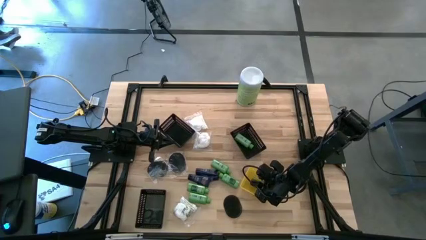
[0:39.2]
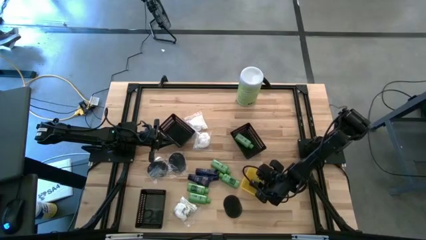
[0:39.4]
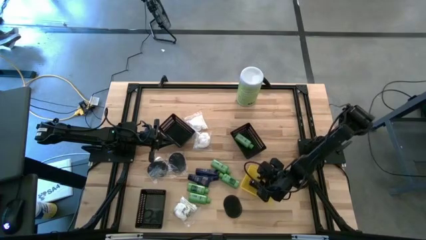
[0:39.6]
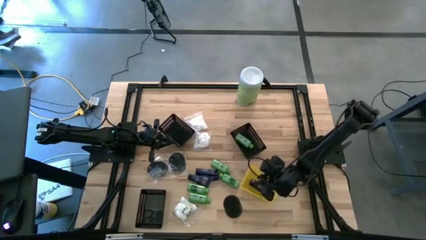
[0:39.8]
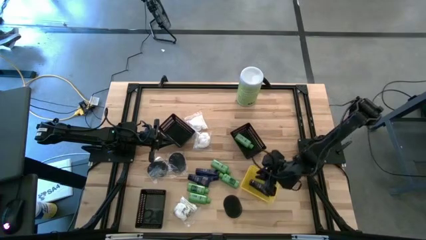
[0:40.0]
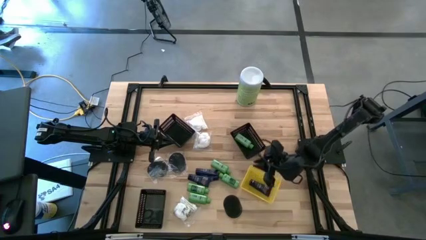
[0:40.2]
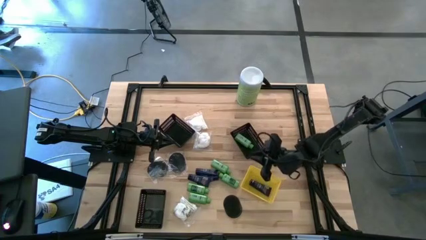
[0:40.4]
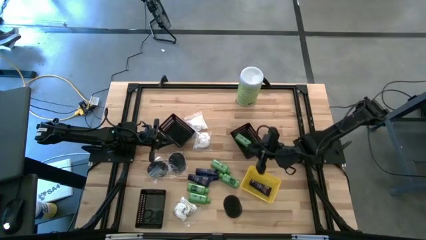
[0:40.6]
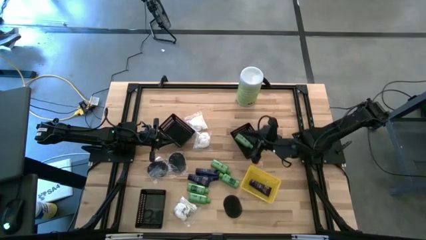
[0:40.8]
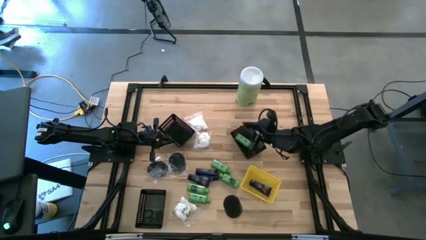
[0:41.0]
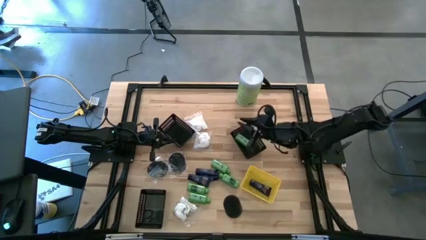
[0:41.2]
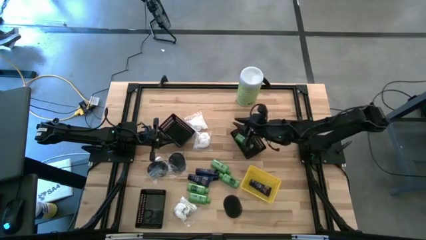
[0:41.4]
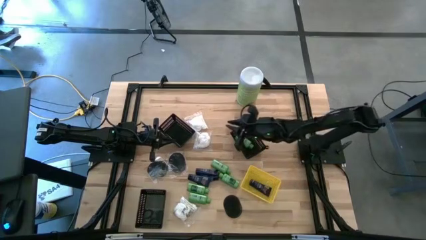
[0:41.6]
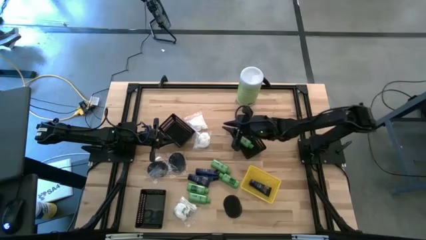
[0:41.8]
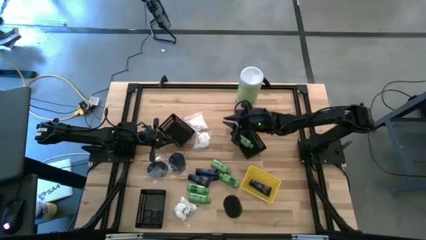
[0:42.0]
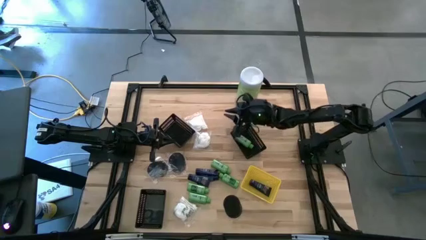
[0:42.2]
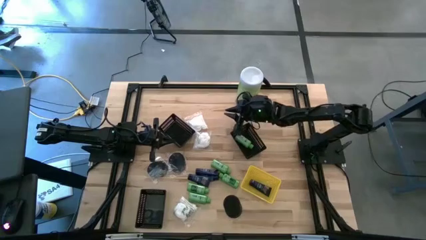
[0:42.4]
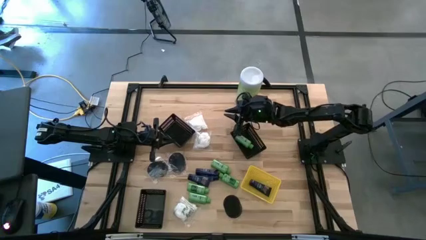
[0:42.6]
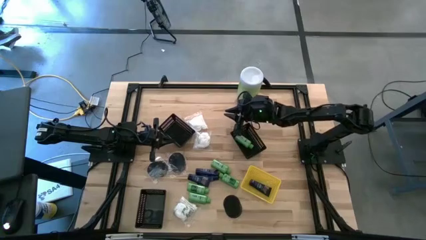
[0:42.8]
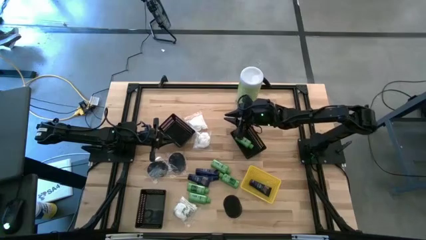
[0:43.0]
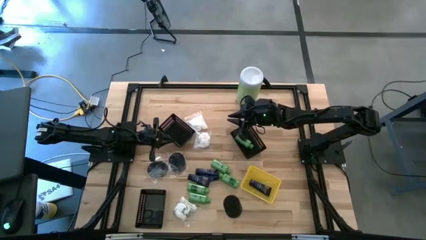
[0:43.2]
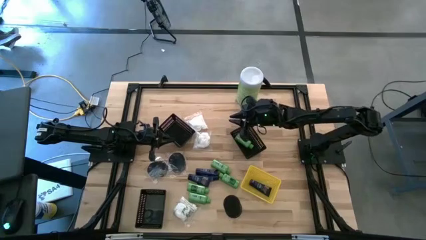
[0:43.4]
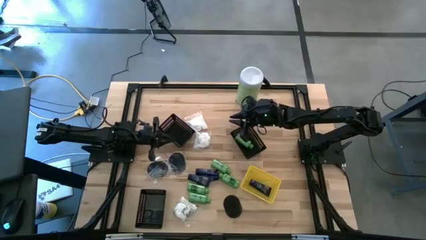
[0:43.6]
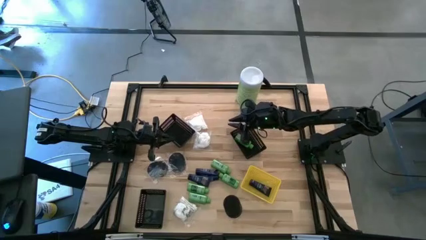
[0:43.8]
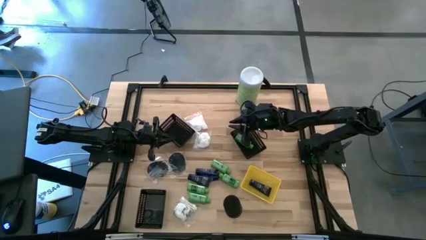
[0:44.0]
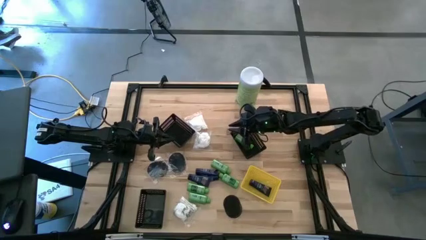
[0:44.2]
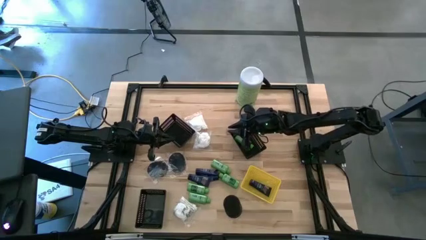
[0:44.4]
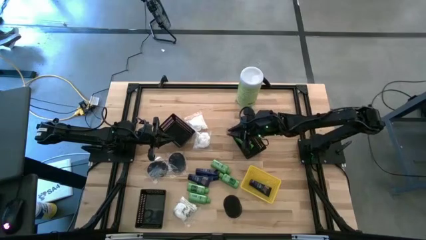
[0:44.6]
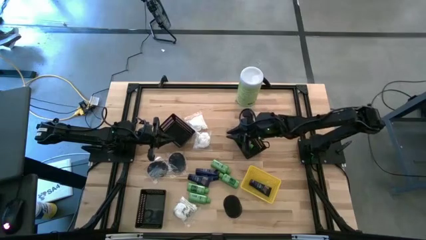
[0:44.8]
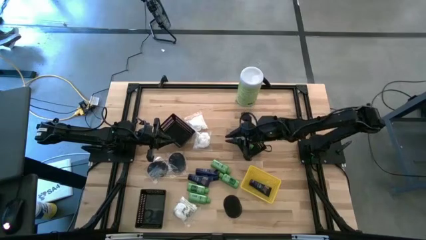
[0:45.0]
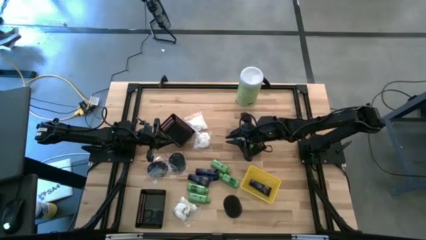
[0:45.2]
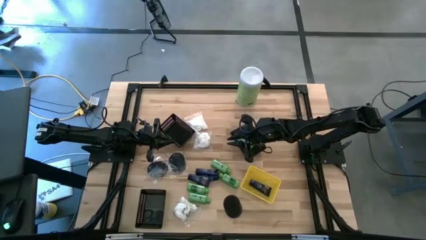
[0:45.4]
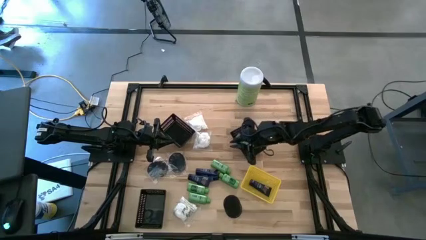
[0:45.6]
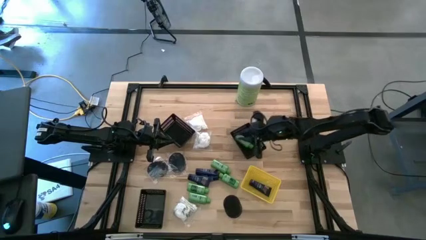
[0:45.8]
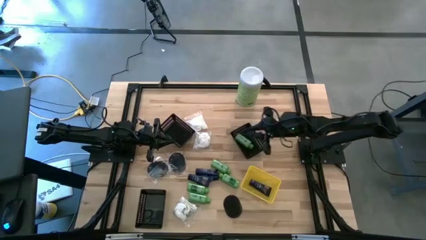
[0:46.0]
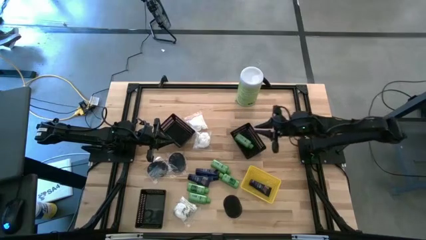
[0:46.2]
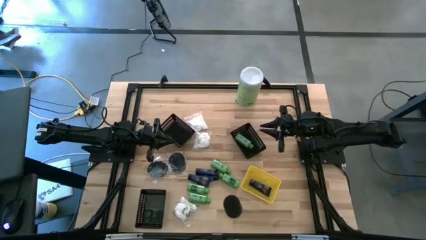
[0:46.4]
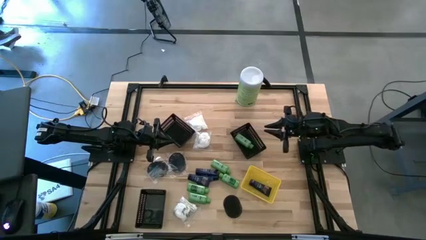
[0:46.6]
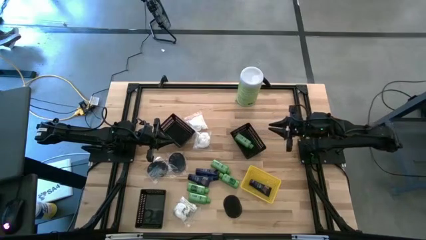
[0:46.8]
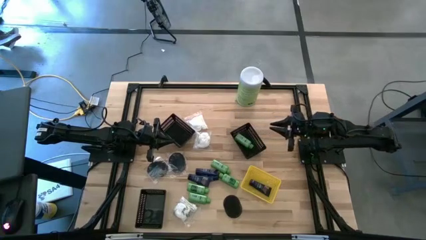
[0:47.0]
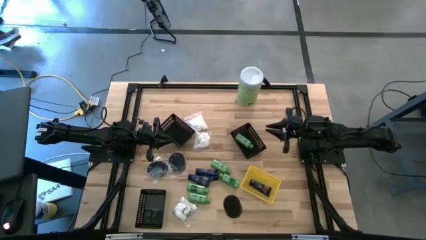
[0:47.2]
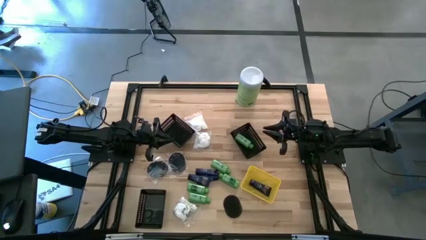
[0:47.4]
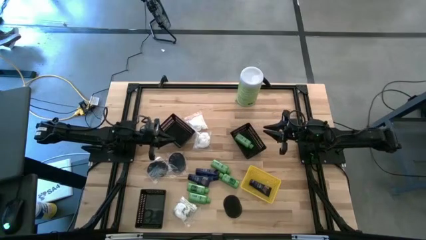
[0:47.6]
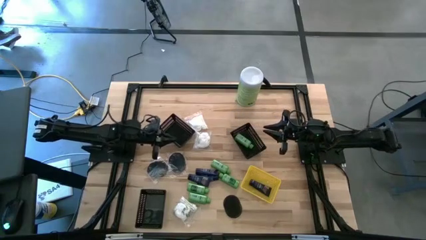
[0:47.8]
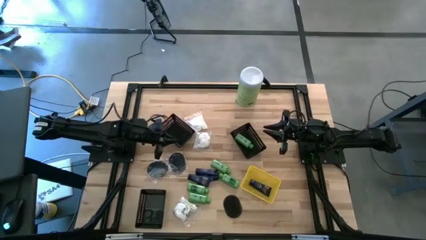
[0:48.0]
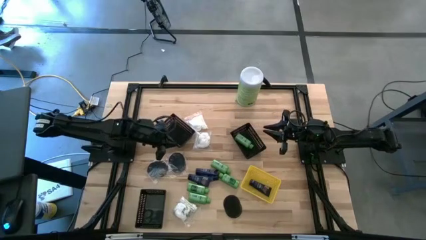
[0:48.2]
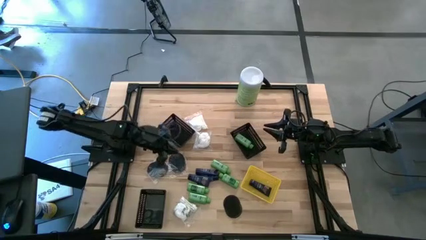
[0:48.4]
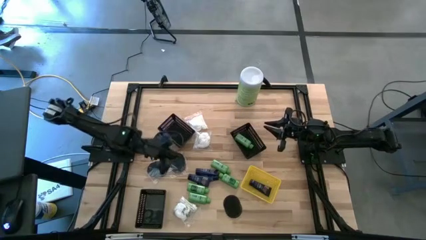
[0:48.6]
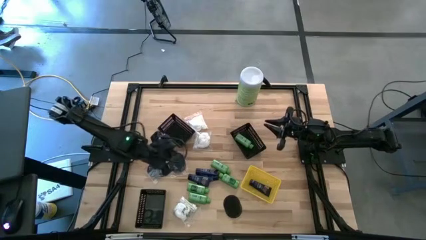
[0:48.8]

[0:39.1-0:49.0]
Task: Pick & Place Travel size toiletries
Put the hairbrush into the top left black bin

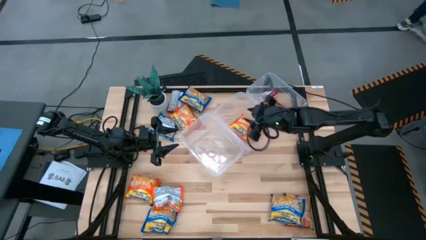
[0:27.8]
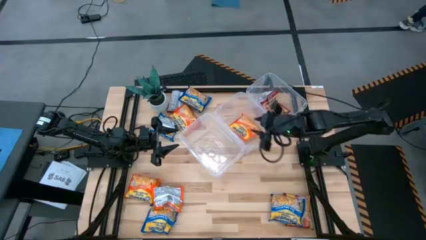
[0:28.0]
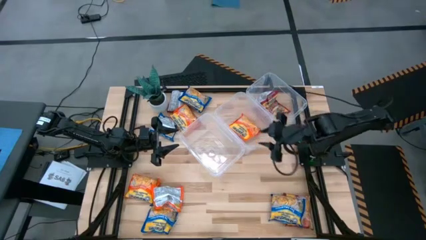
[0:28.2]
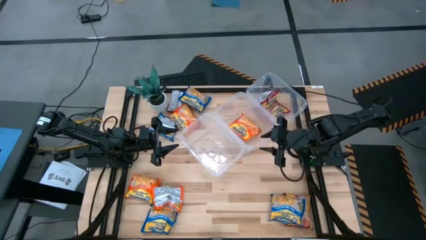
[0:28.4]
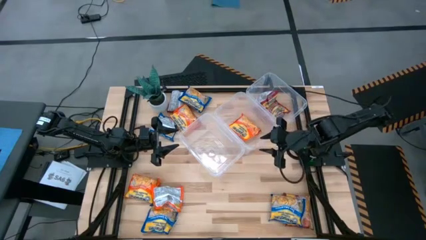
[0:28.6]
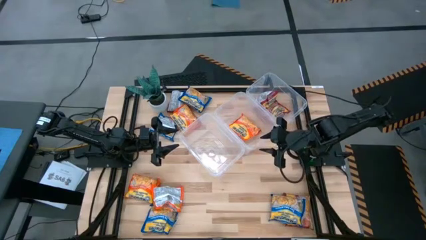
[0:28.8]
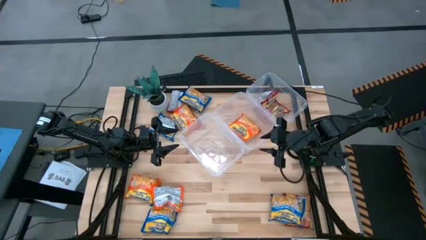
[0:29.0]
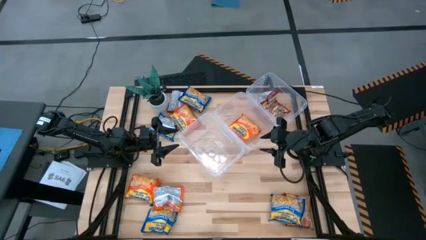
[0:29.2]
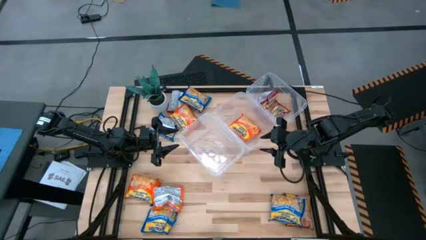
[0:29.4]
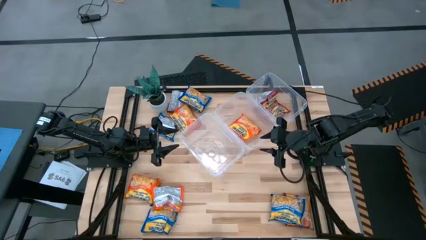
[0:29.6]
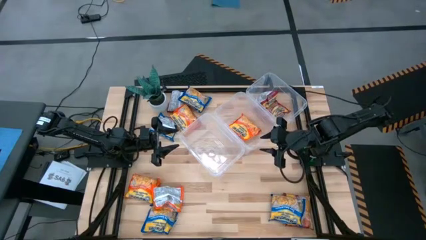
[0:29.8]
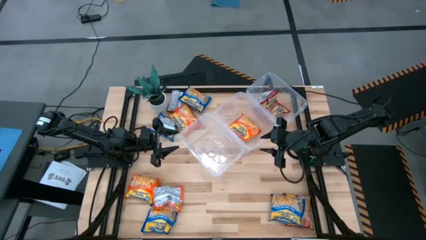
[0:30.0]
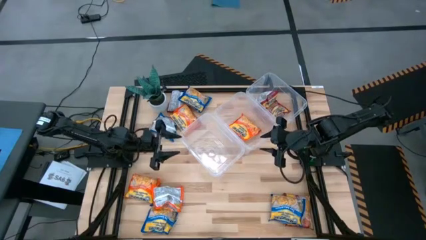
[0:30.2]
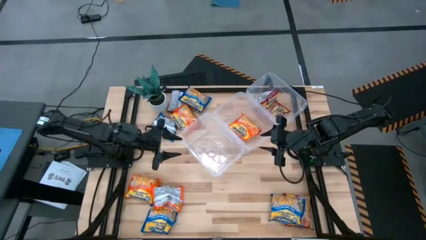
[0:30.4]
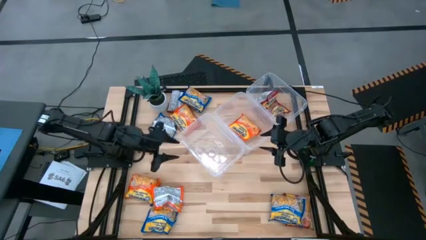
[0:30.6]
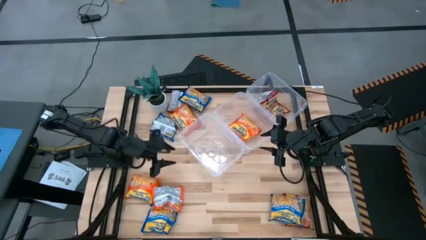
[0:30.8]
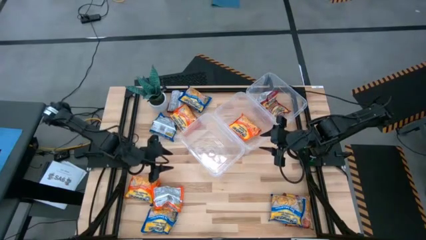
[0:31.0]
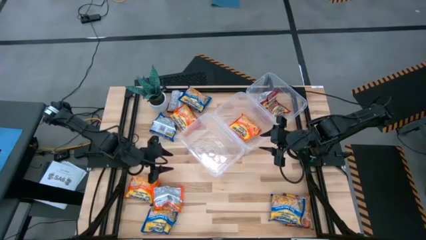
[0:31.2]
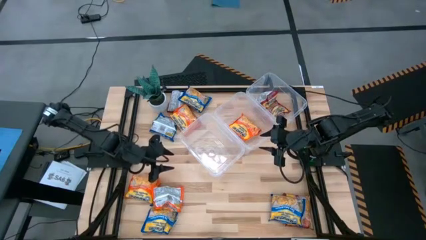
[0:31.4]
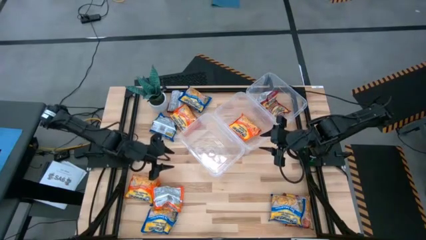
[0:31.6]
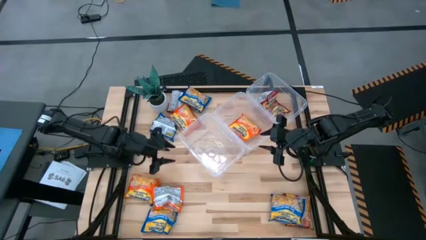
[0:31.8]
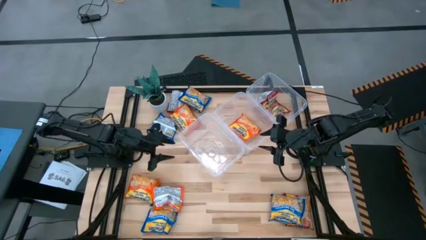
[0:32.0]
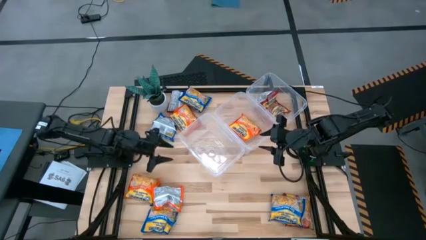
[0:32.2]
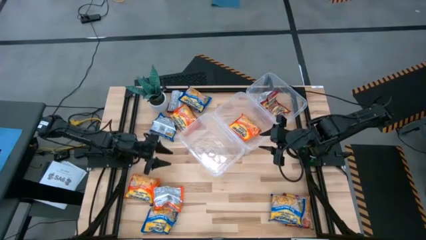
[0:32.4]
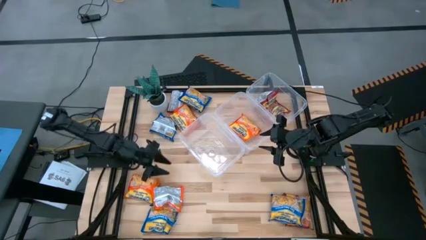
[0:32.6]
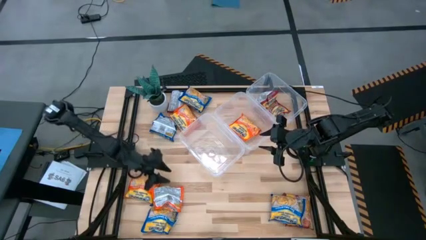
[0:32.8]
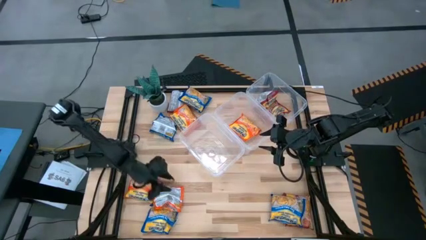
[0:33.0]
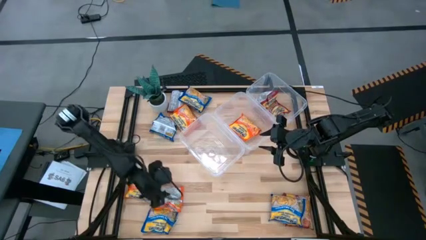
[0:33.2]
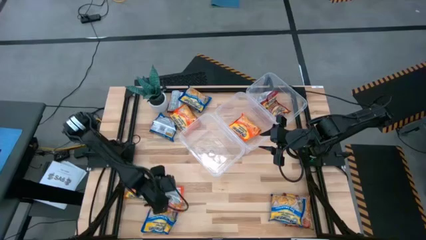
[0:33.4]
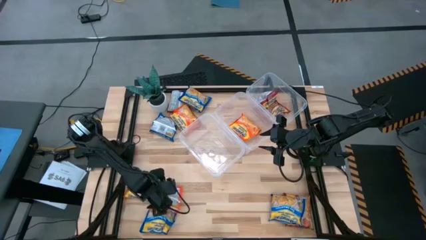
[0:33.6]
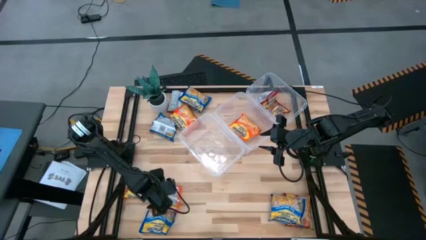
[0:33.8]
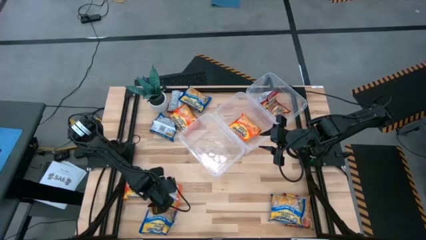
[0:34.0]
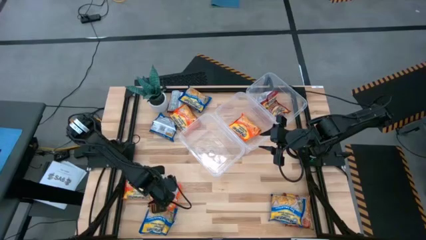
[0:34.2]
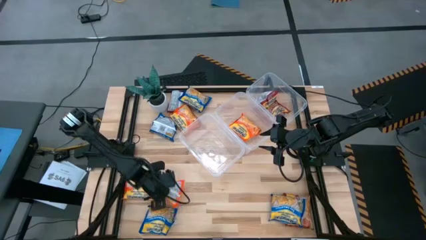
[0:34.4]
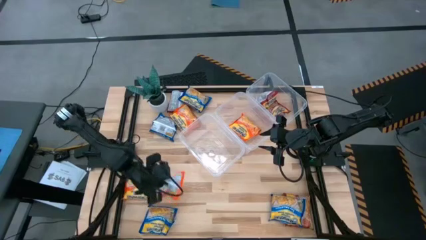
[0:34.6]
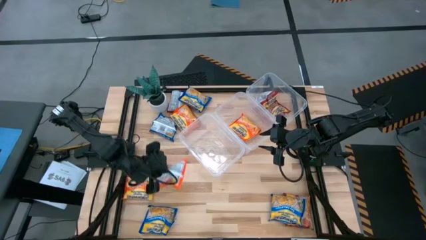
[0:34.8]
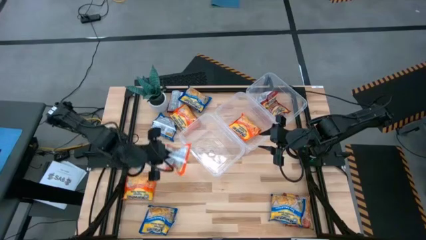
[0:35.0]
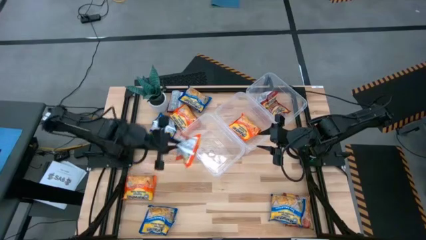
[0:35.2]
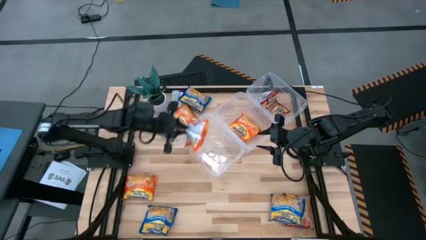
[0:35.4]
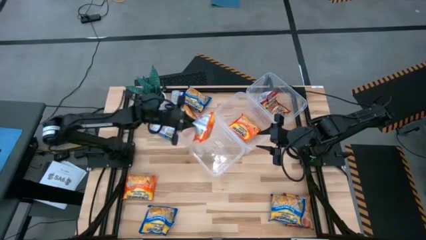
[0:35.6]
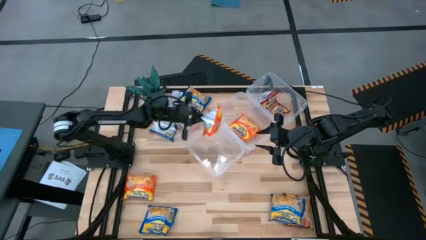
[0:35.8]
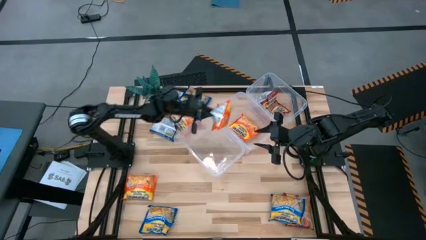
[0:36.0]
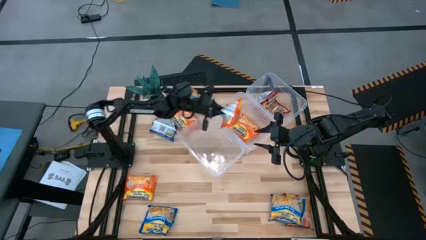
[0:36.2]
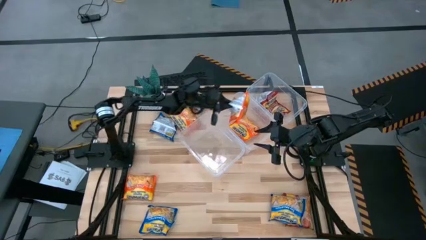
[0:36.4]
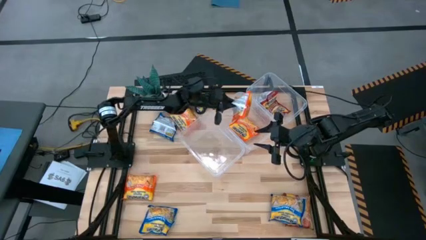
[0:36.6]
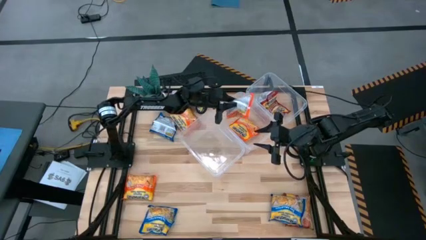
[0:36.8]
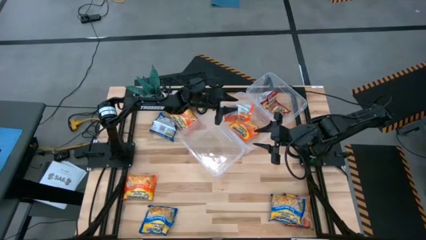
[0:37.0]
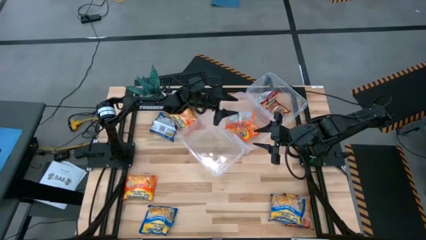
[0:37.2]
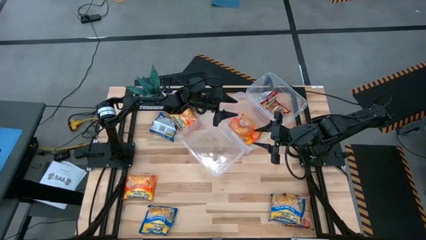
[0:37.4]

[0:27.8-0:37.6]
Task: Sort Maruchan noodles
Put the orange noodle pack into the middle transparent bin
